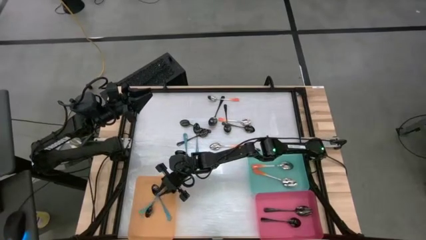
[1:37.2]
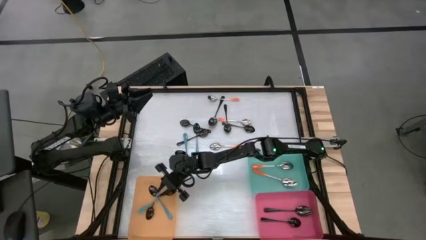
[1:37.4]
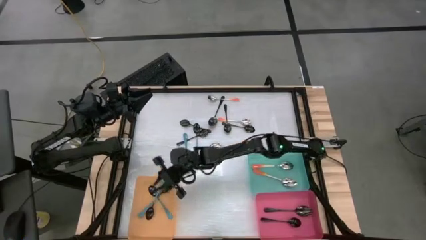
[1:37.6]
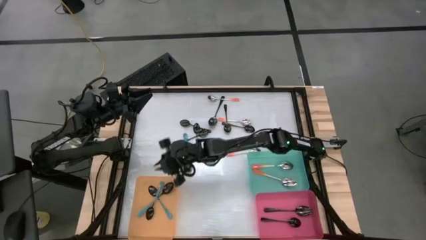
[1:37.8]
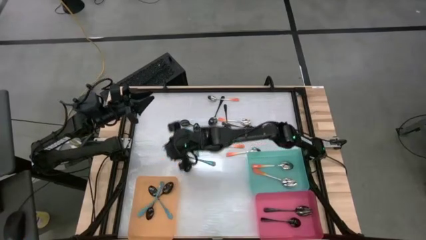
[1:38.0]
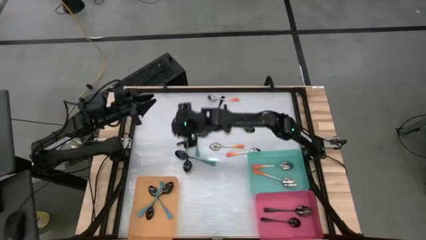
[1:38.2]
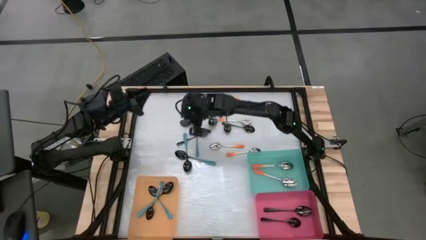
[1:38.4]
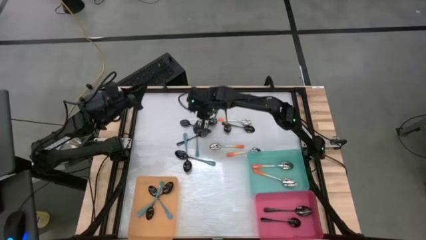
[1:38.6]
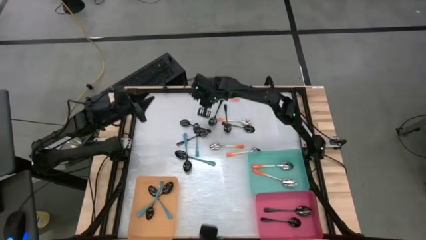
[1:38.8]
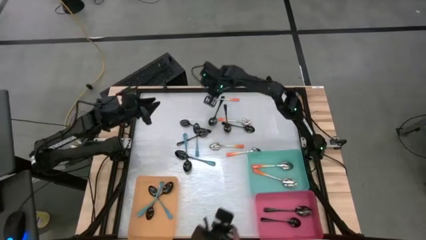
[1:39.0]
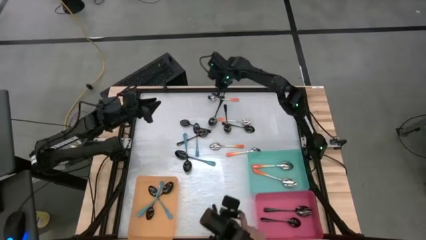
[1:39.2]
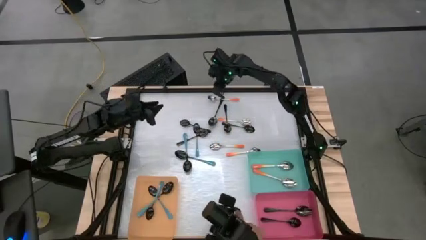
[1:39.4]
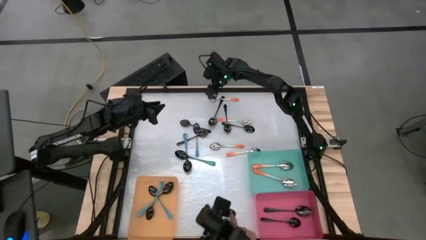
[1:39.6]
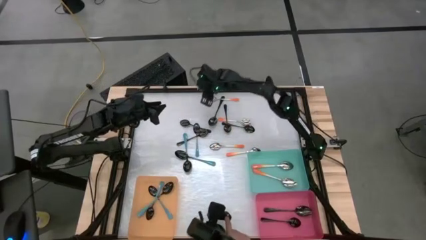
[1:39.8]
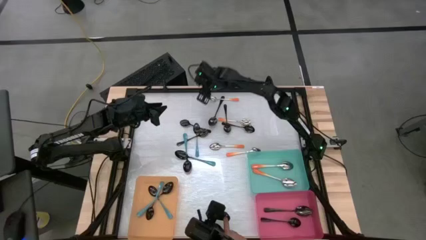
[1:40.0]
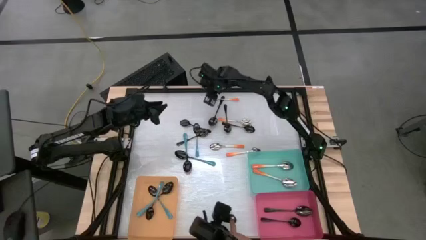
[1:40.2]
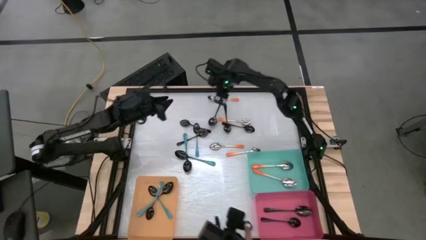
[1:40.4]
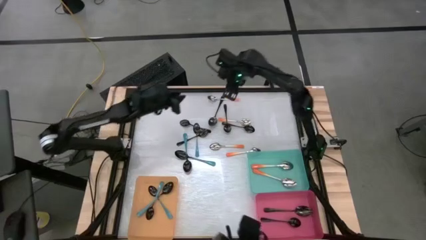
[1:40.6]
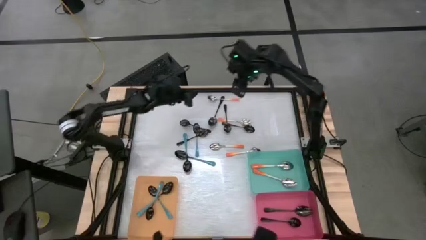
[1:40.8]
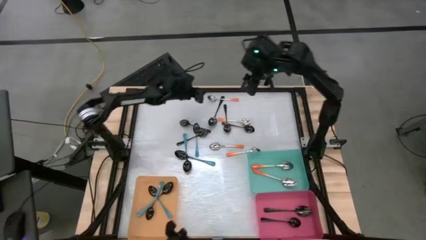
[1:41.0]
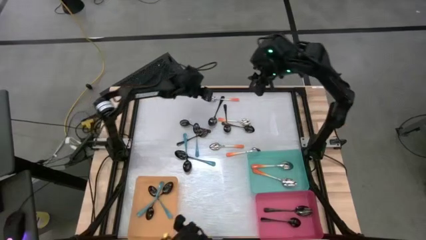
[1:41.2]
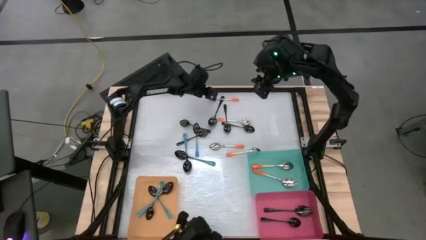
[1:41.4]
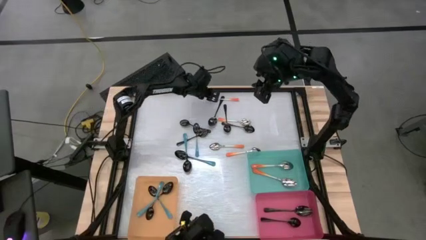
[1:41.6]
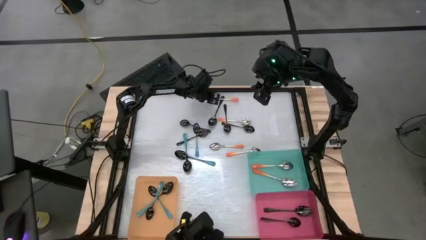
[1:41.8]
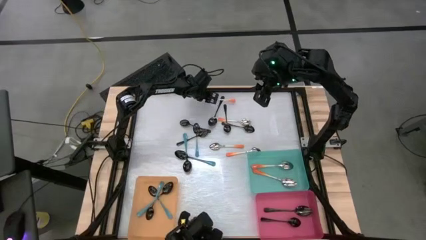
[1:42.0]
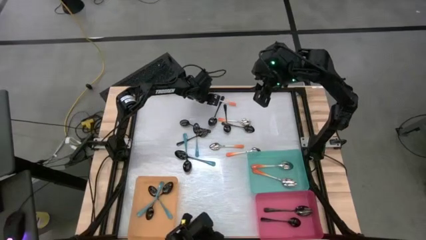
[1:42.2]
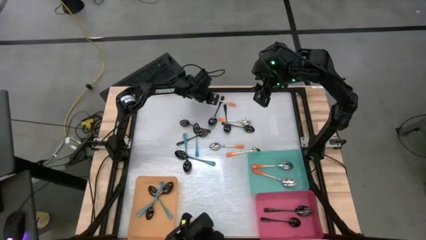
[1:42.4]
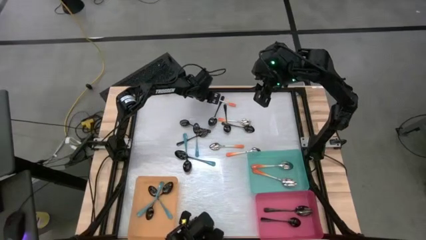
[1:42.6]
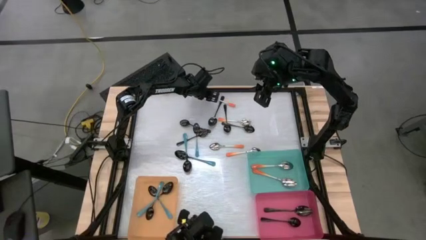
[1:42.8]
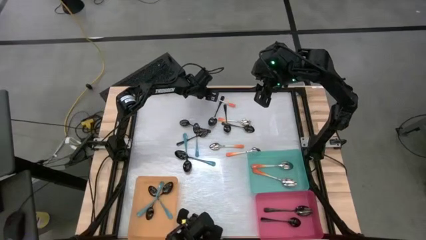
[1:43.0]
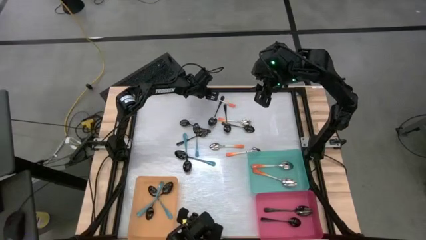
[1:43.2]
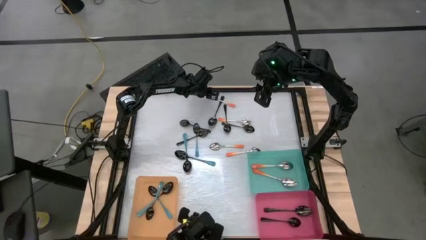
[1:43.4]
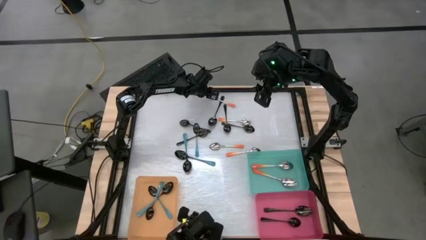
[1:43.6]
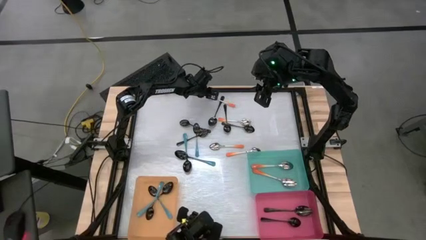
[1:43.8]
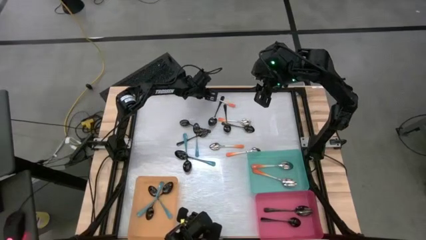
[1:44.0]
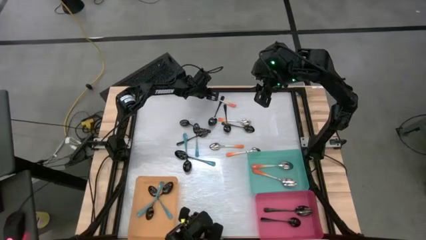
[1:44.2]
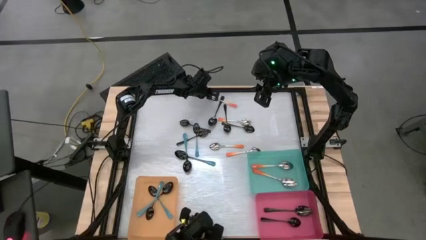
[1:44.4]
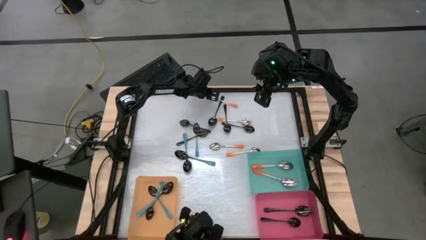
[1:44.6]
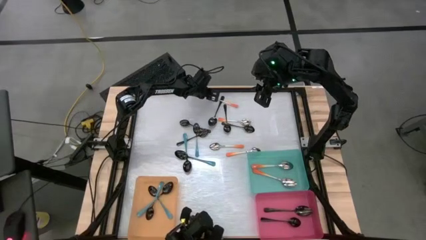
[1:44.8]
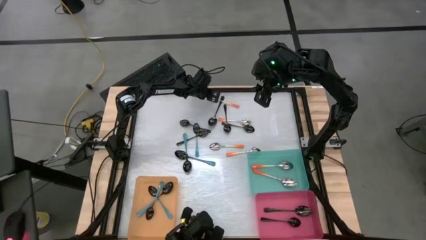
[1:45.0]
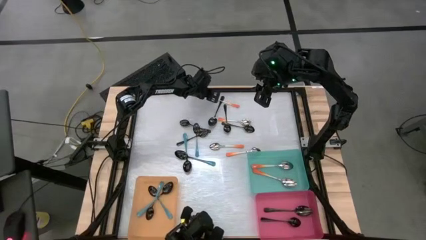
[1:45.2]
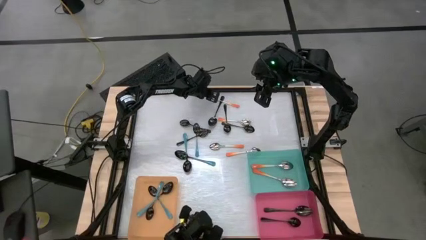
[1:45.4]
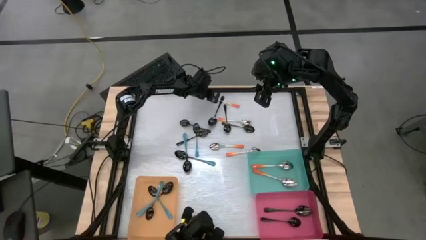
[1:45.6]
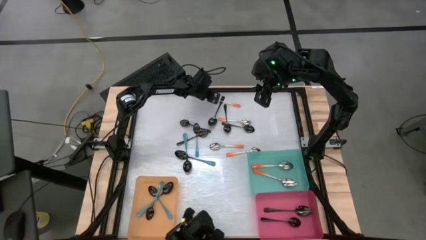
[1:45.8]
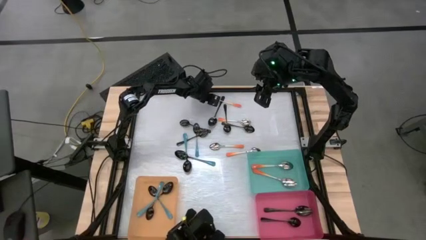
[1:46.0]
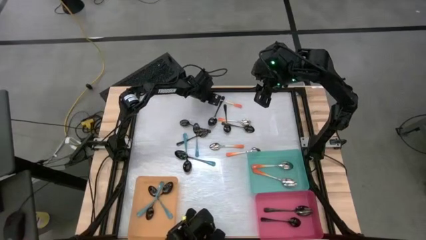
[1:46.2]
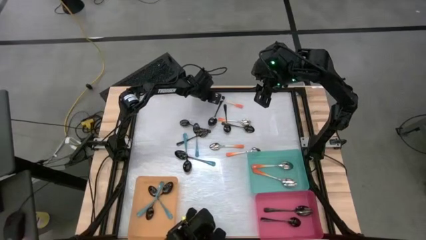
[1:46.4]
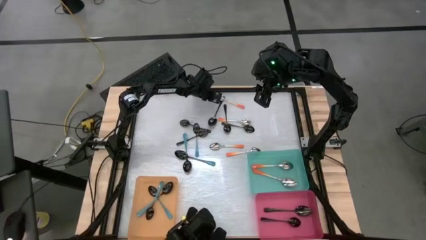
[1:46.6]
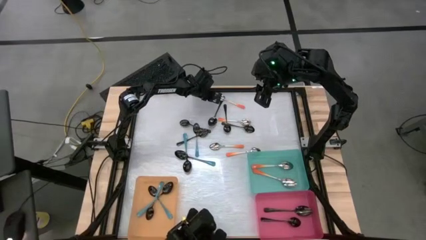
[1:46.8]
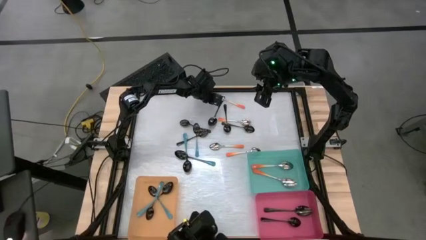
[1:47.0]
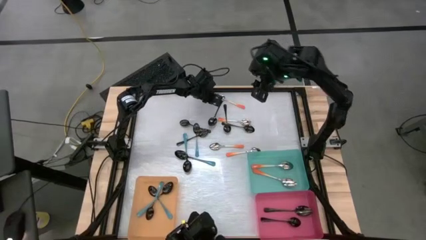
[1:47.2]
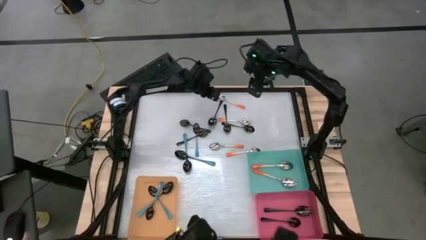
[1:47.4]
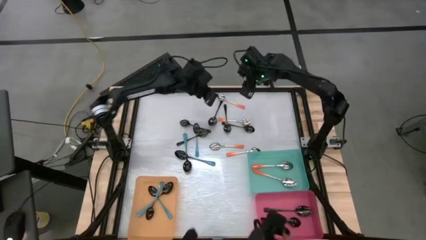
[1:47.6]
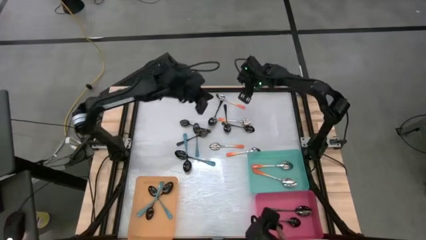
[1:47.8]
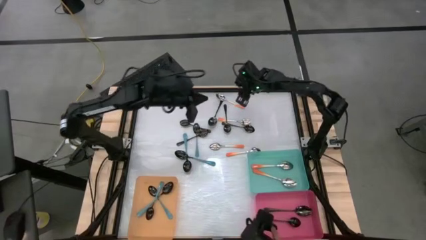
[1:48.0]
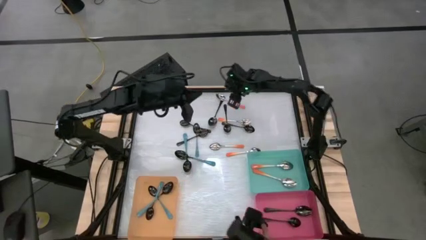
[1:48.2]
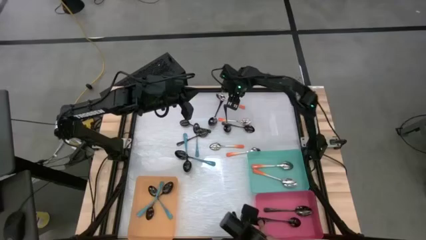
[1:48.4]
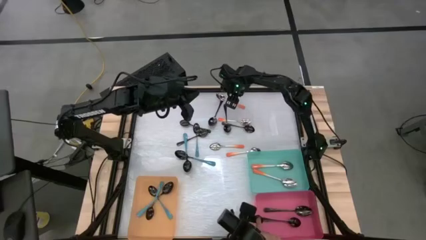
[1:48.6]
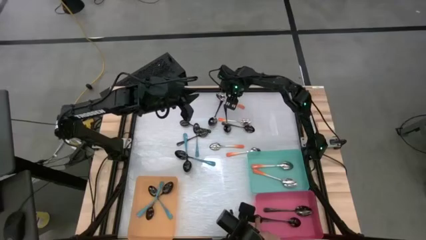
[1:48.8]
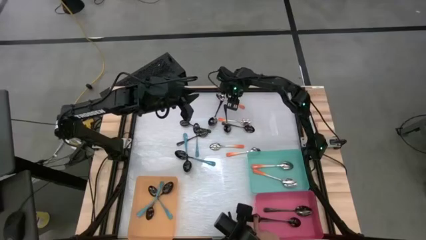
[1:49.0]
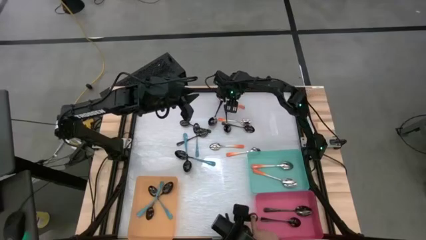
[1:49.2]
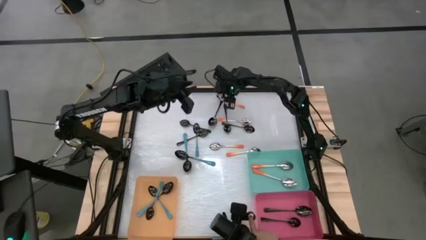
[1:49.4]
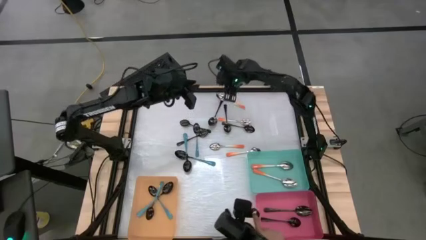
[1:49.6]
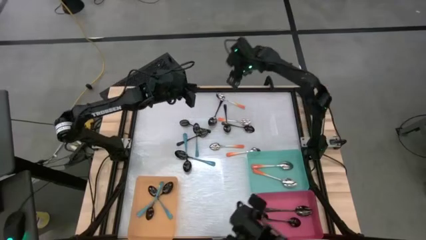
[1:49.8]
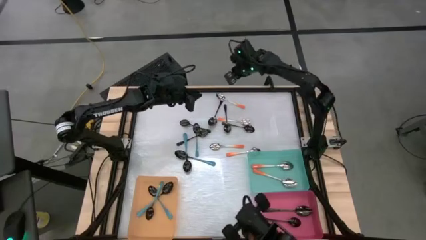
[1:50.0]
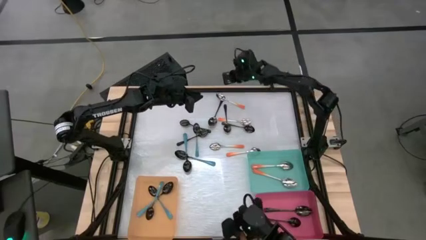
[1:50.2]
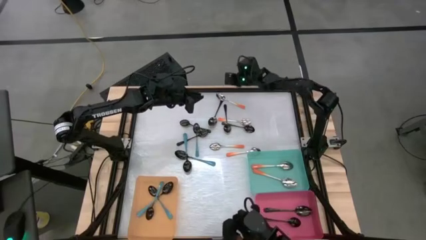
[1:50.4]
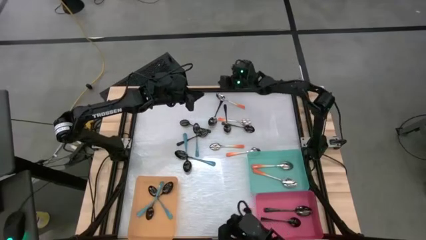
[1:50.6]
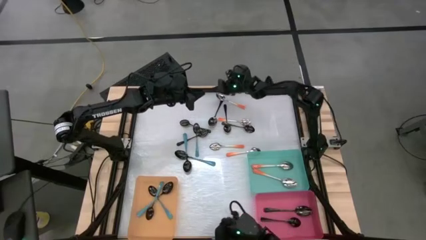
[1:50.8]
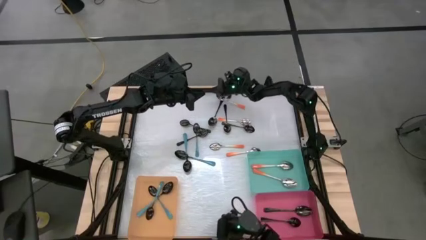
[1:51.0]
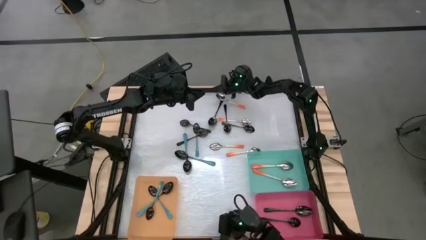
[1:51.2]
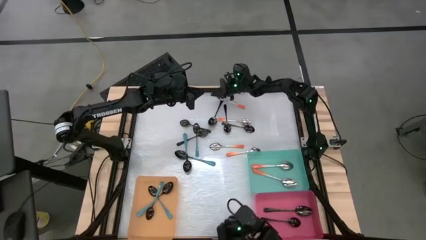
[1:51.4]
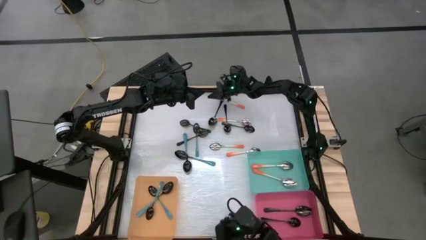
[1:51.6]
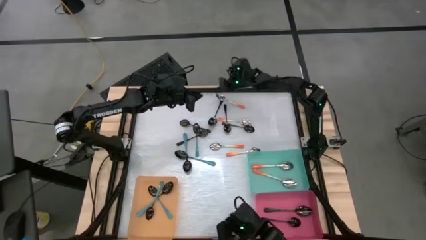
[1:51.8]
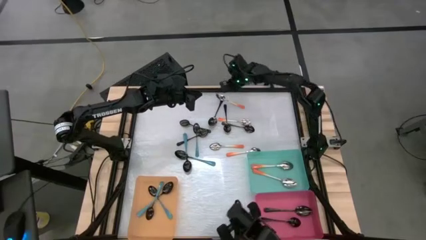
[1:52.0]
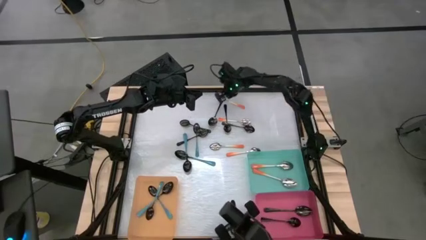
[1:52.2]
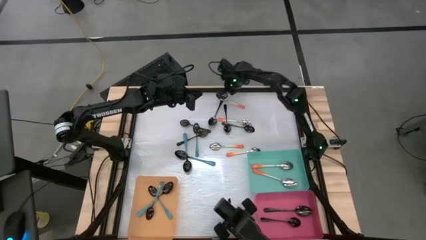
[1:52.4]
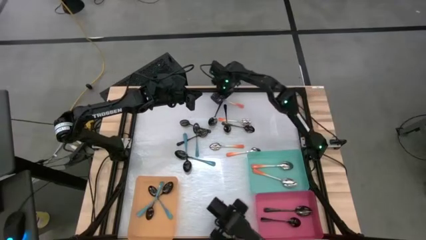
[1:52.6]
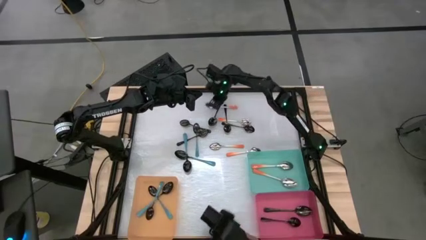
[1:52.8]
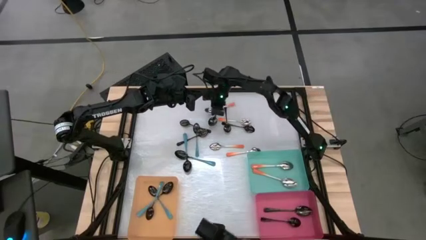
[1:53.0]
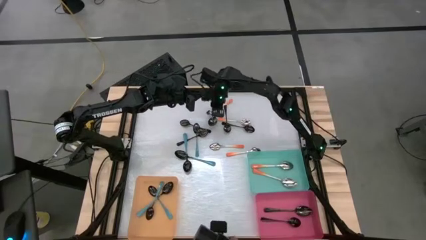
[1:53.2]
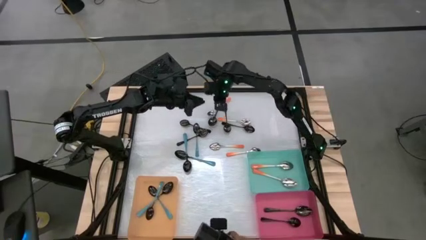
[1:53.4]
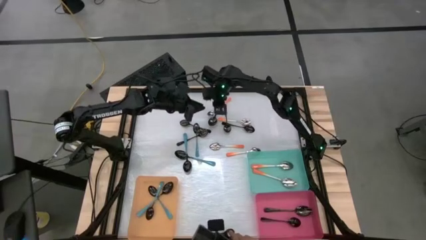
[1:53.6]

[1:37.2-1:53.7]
Task: Sort silverware by color (type)
Put the orange spoon into the blue bin
